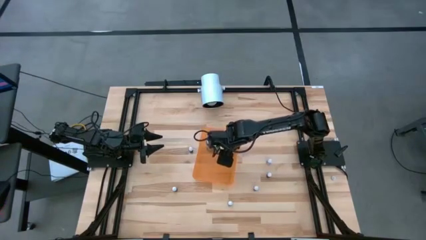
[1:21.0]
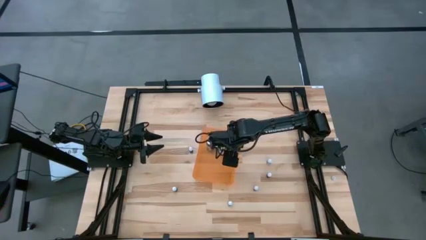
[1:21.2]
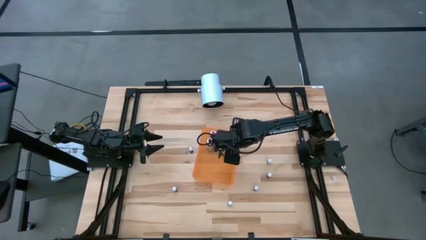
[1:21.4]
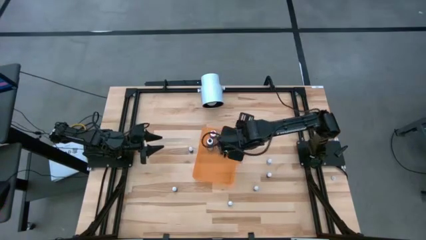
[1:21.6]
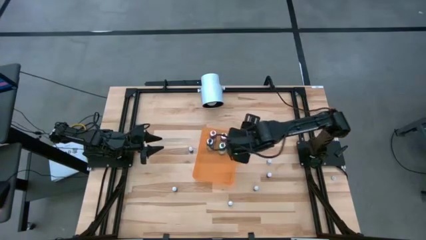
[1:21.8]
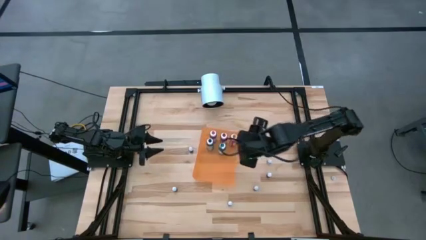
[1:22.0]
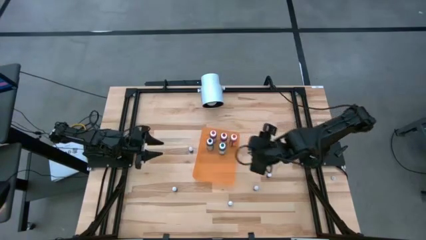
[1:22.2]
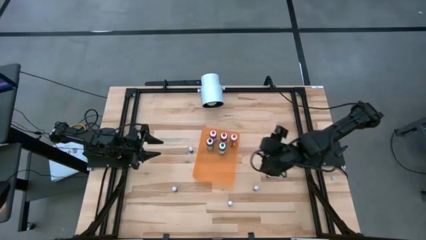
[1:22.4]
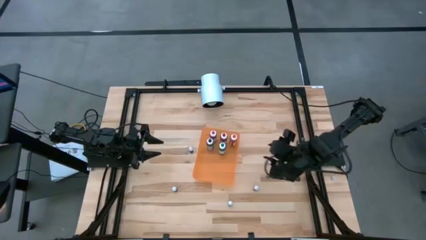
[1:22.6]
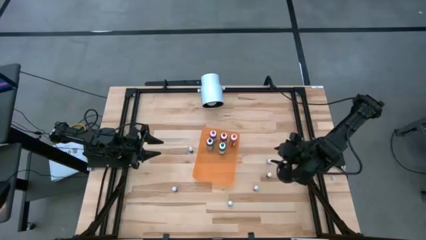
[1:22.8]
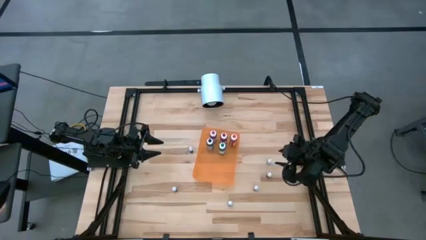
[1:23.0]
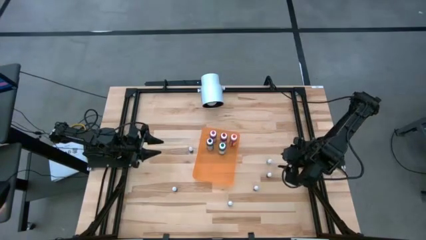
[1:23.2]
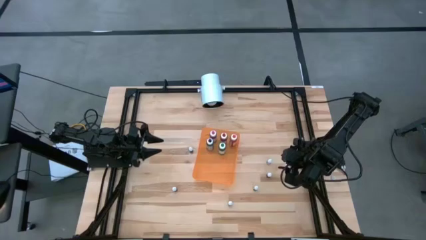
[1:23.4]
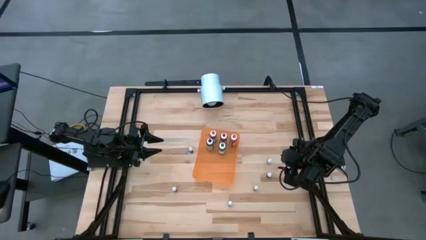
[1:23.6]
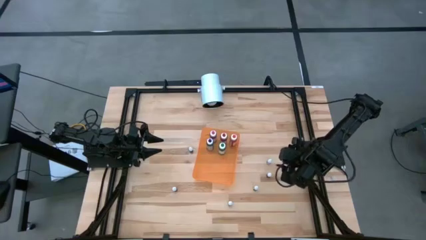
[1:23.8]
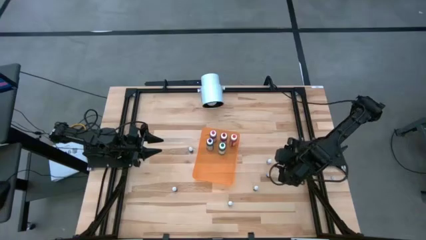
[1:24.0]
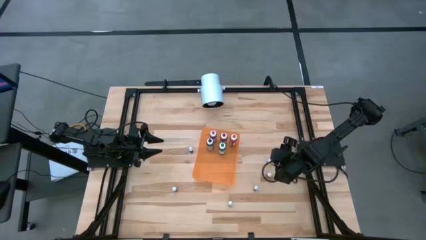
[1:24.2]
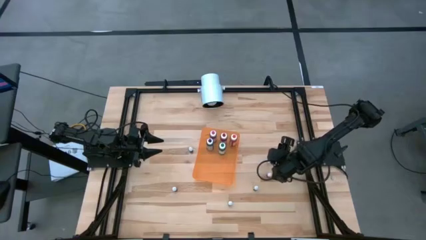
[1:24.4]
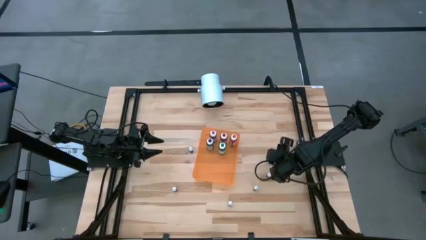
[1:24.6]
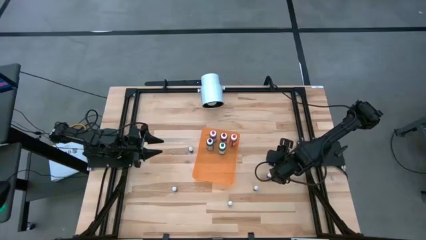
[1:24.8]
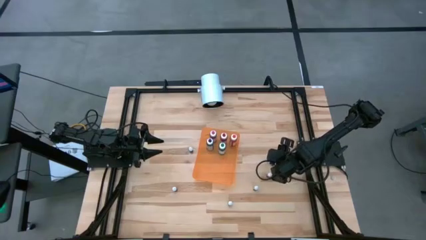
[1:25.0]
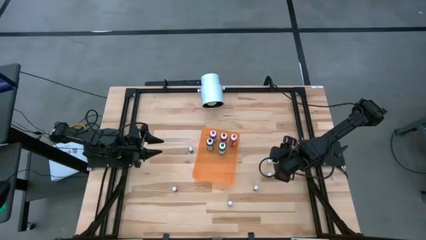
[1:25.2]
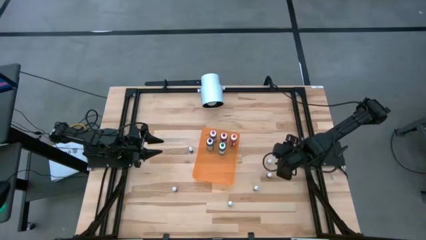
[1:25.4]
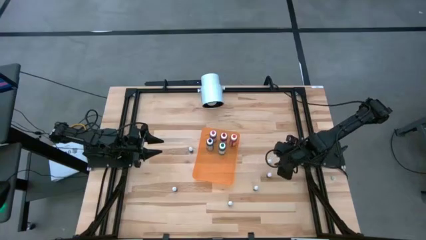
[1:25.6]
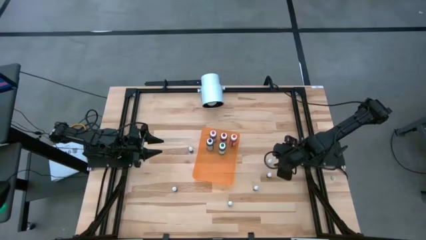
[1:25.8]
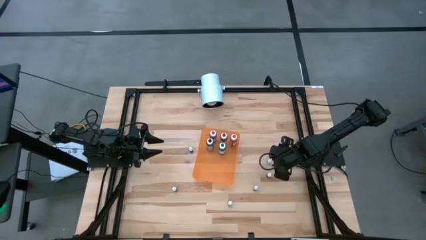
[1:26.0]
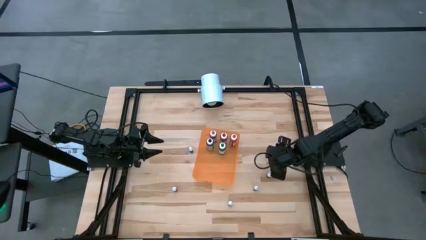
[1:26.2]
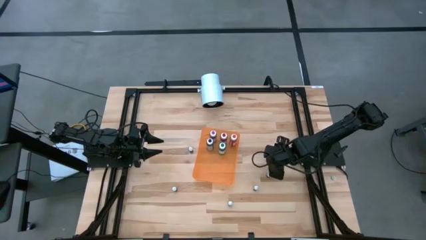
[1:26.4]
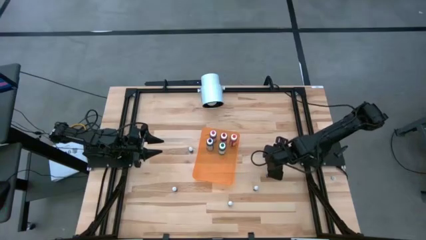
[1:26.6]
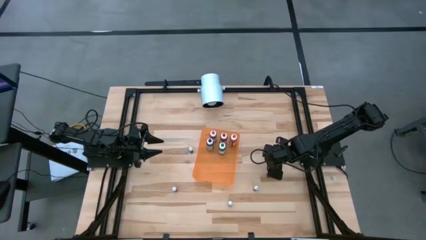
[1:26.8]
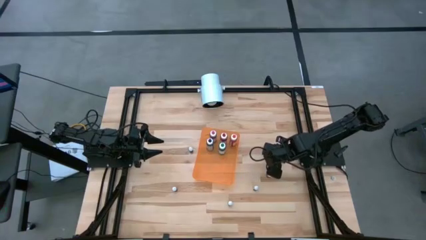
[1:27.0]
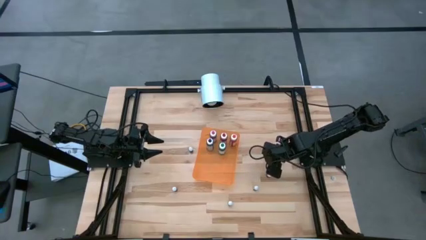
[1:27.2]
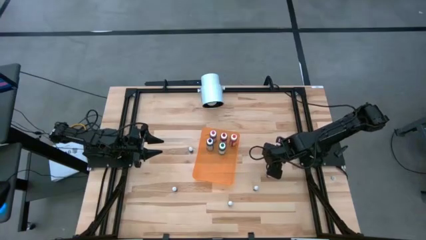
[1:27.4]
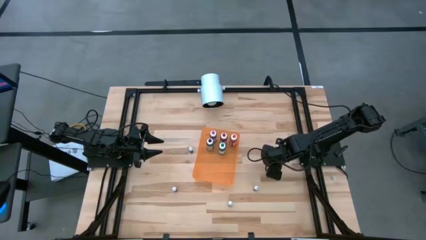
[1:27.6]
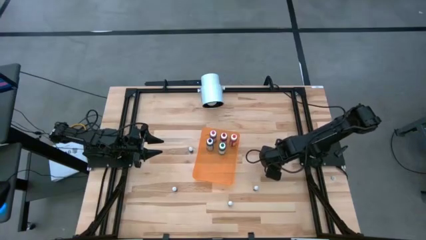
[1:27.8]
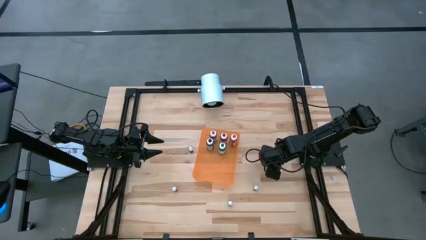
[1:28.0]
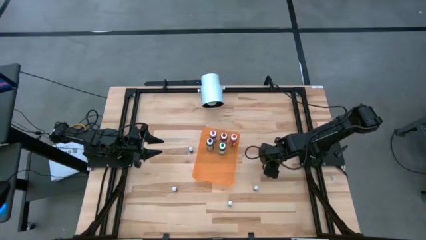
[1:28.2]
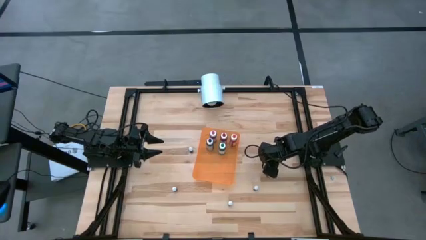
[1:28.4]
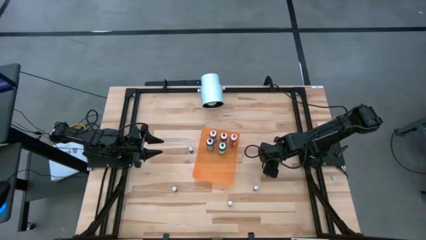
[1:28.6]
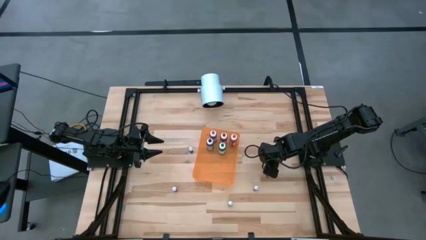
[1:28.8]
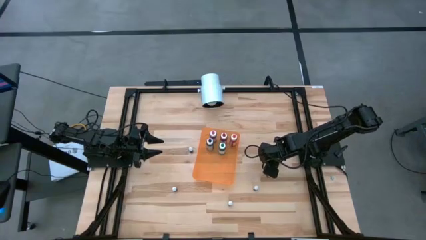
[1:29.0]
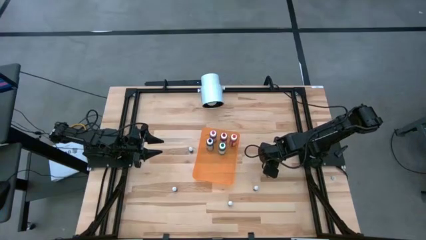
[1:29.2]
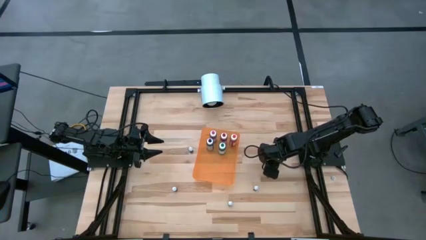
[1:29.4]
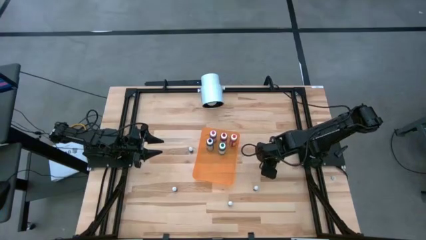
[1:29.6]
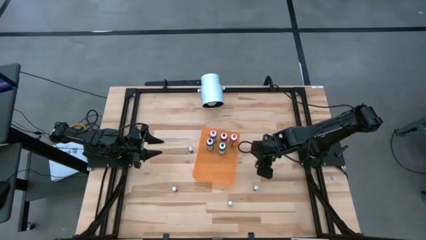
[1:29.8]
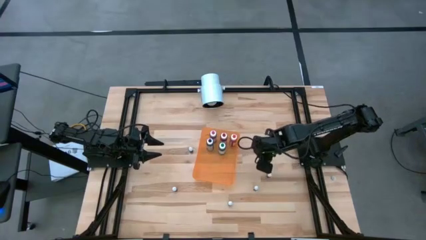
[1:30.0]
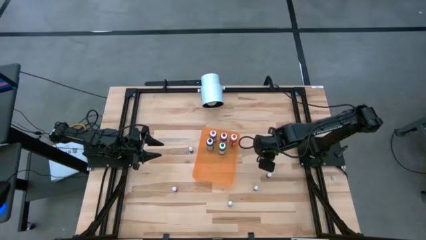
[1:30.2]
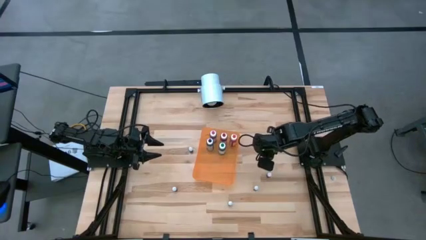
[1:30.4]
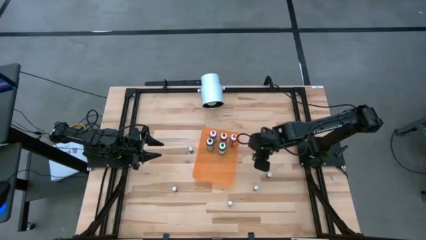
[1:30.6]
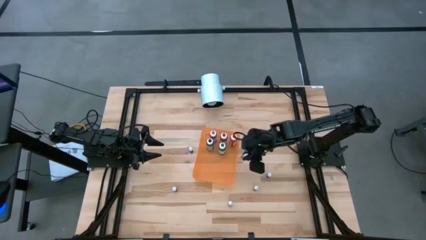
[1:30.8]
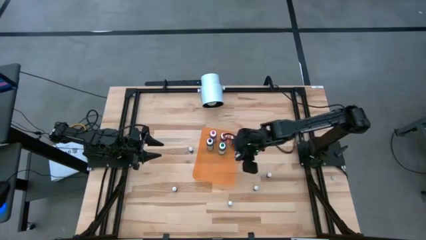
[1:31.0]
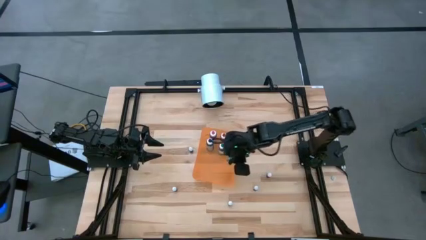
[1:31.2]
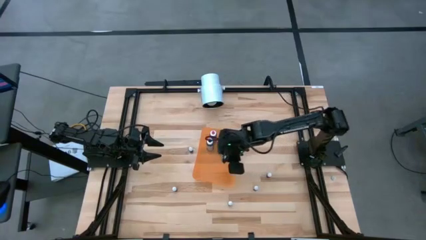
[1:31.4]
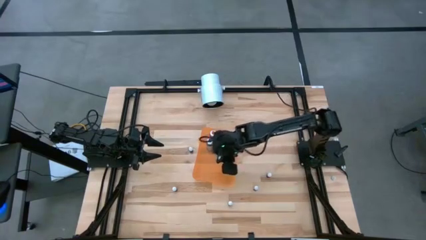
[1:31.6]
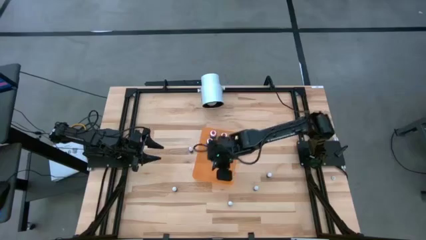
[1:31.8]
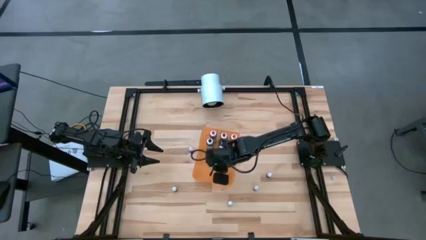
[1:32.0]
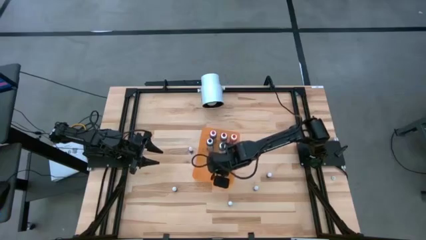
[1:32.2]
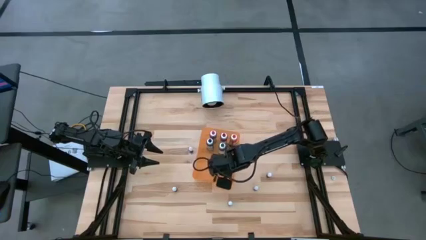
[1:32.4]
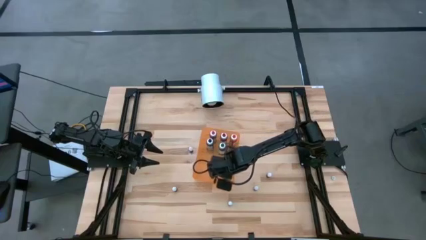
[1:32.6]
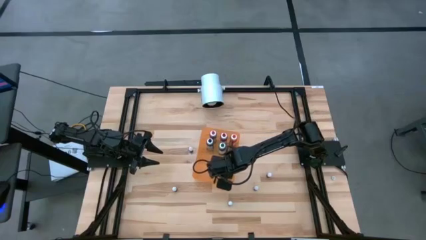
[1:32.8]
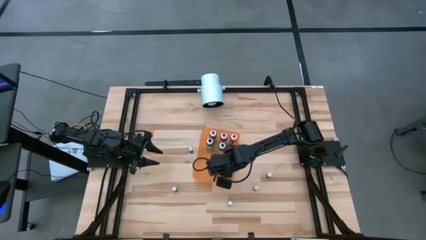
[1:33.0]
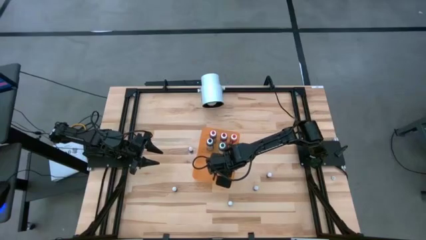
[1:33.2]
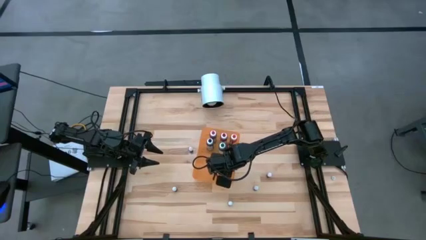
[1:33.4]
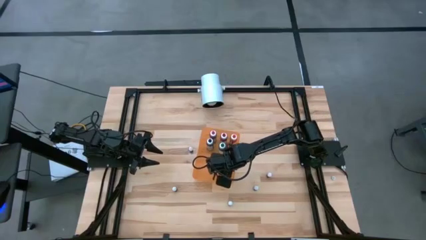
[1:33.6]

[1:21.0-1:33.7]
Task: Pick & Place food coloring
Put the top small green food coloring bottle into the orange bin

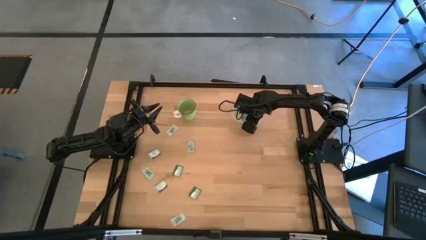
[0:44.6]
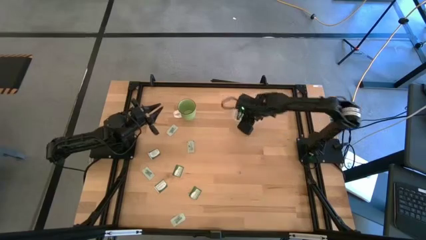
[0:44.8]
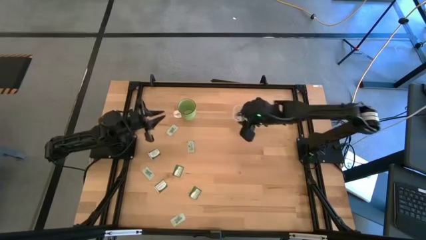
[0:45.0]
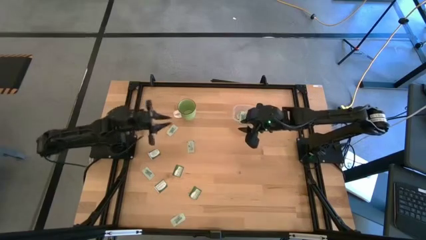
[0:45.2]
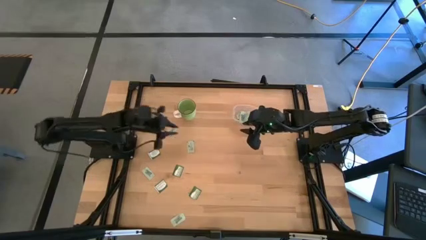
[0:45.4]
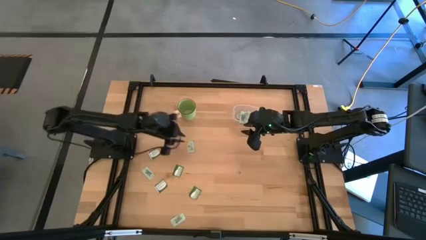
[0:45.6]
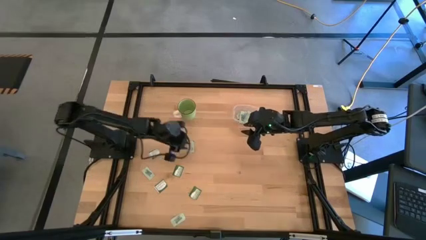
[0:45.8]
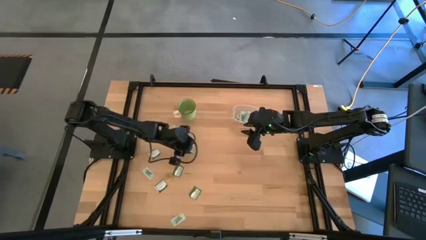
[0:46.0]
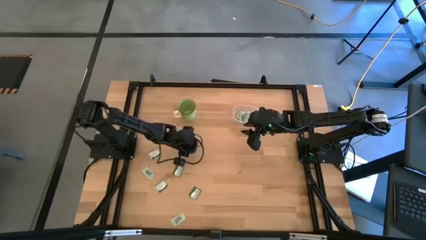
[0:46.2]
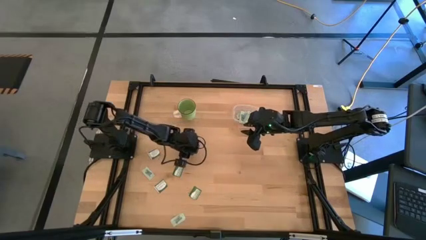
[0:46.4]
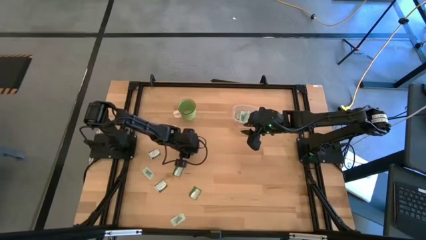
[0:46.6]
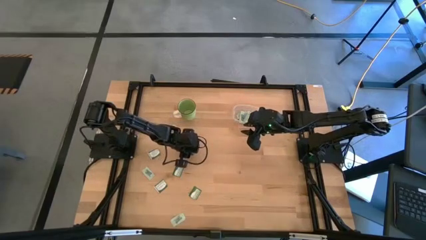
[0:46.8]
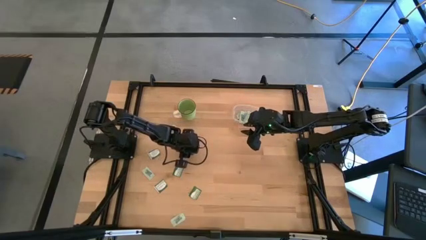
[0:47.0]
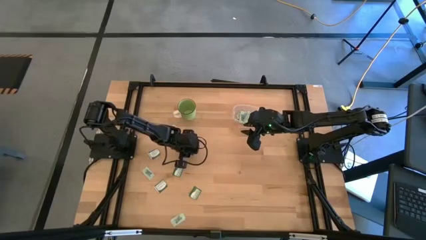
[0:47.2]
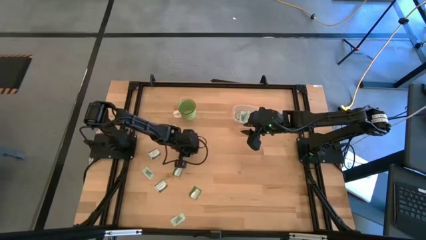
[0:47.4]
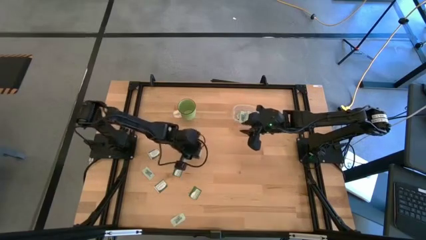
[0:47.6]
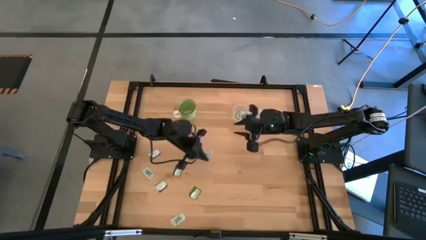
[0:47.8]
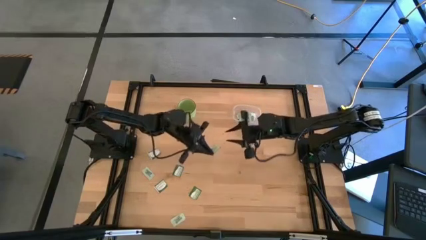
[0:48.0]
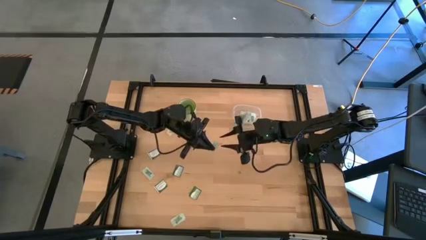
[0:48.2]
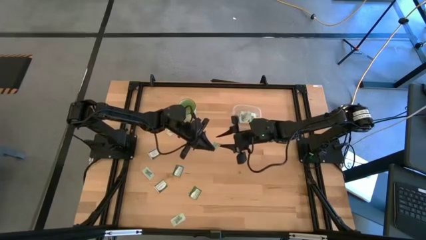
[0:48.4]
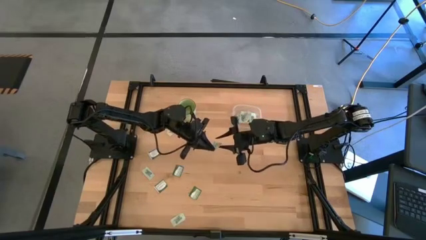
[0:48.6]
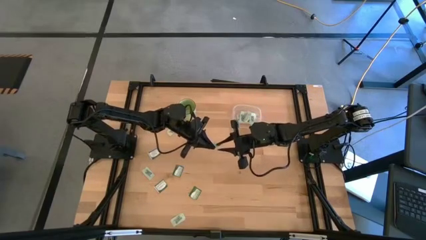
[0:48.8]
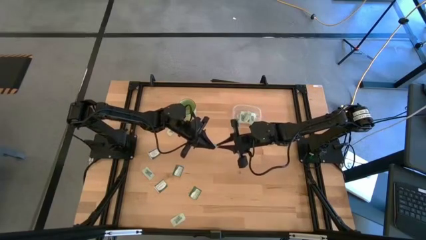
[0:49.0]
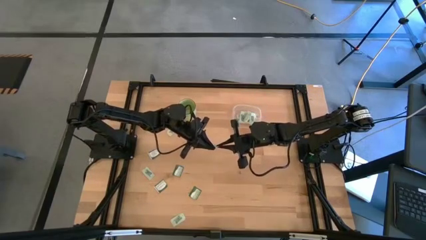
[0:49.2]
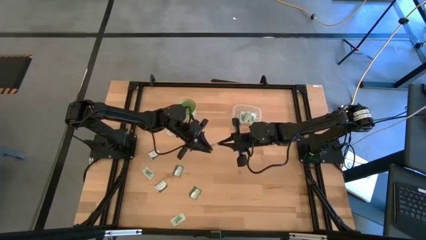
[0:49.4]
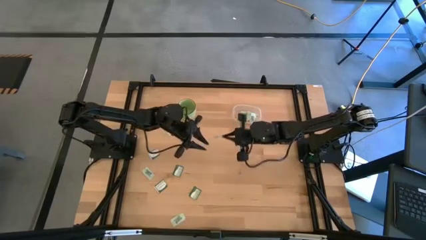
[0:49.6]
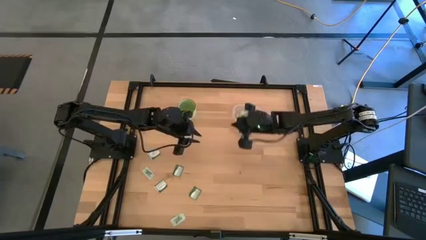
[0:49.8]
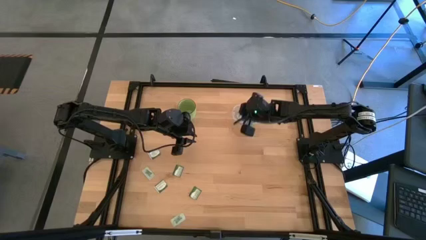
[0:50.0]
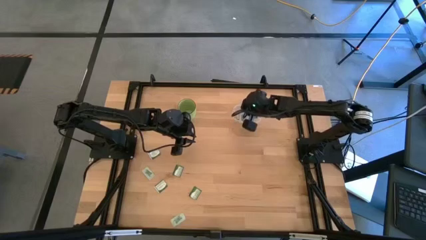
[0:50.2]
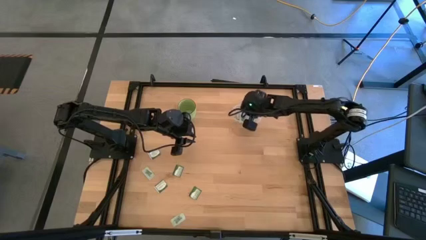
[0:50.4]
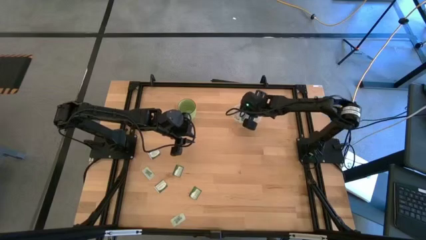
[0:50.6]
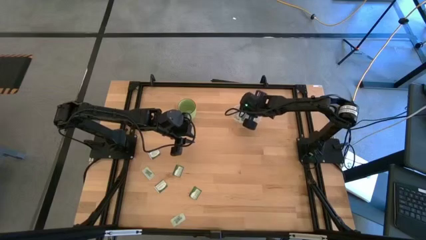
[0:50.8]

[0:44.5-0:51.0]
Task: Pick and place items into bin
Put the white stevia packet into the transparent bin
